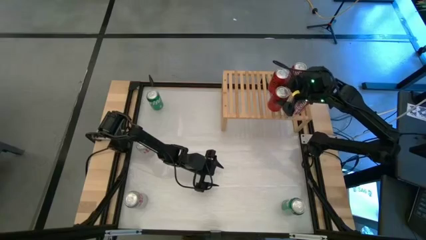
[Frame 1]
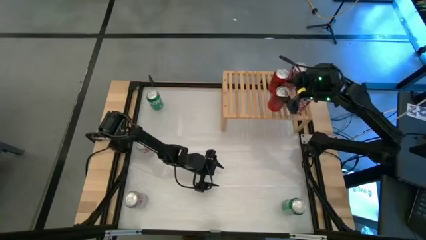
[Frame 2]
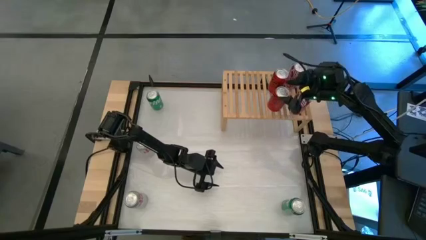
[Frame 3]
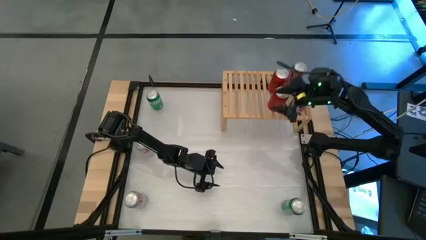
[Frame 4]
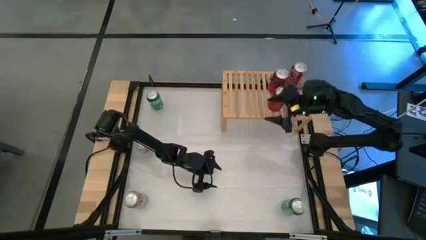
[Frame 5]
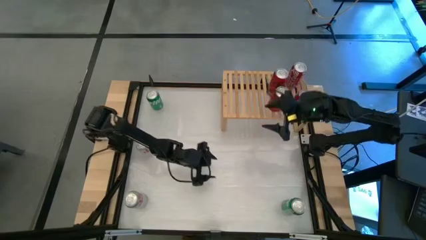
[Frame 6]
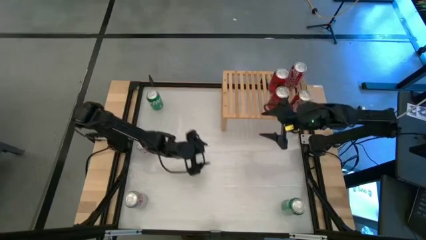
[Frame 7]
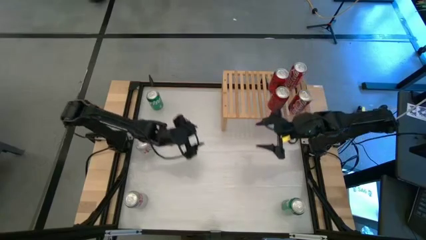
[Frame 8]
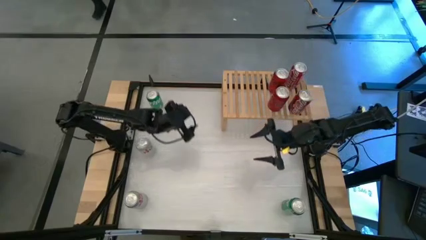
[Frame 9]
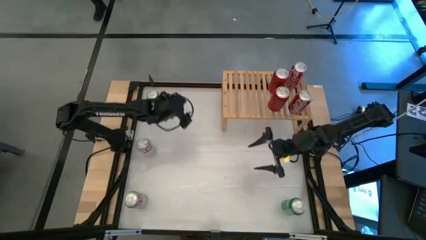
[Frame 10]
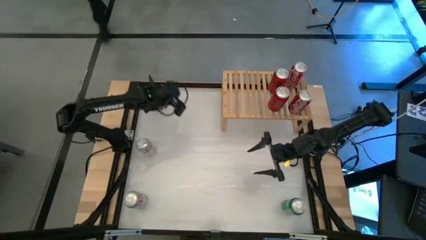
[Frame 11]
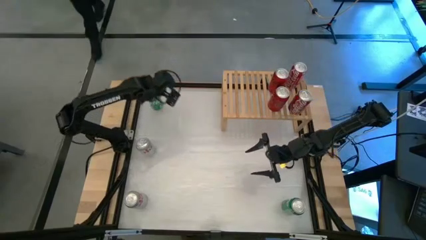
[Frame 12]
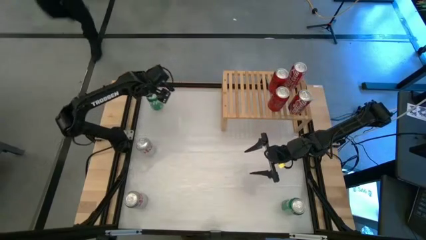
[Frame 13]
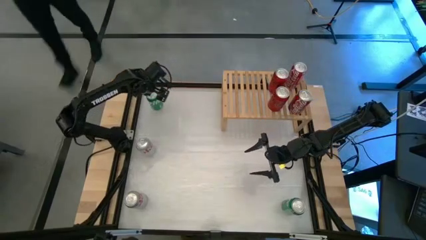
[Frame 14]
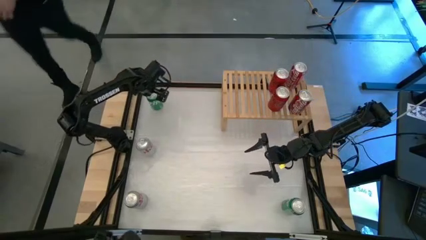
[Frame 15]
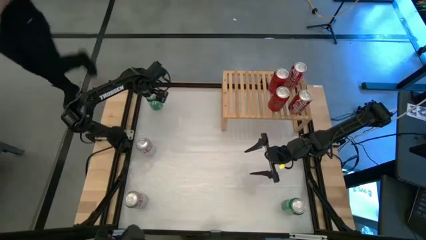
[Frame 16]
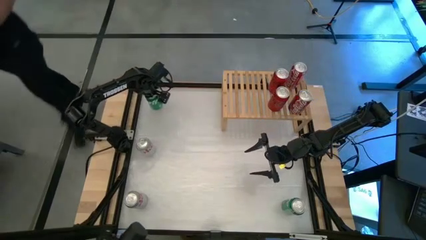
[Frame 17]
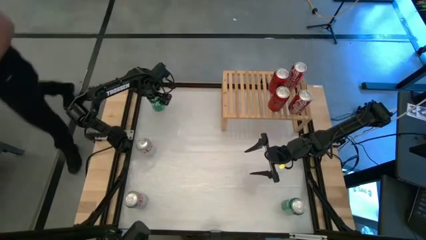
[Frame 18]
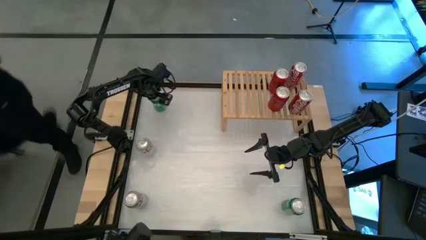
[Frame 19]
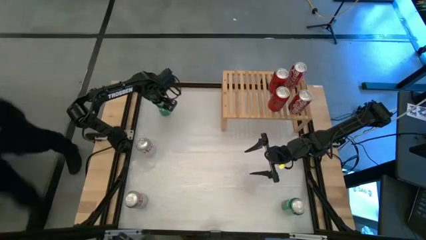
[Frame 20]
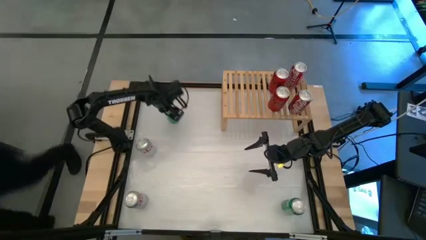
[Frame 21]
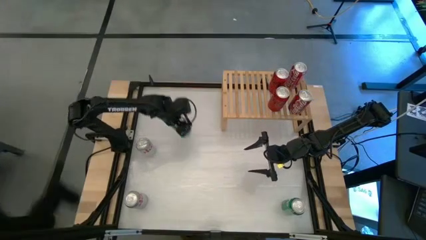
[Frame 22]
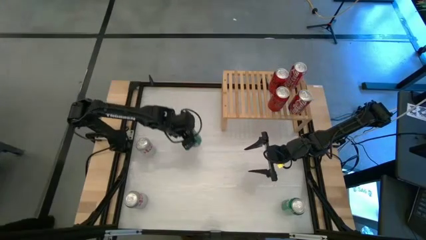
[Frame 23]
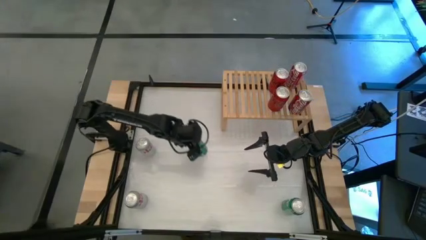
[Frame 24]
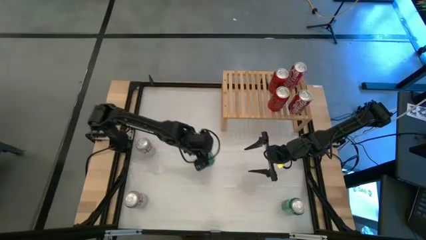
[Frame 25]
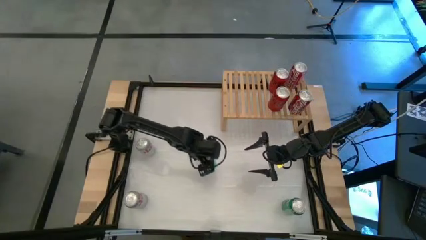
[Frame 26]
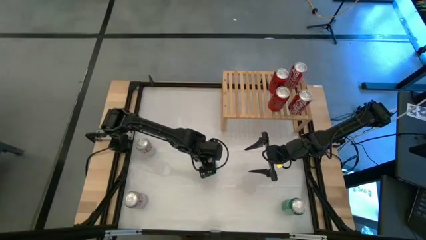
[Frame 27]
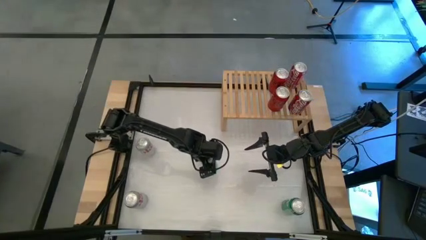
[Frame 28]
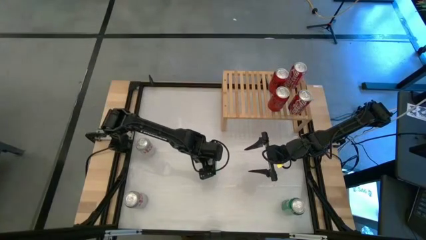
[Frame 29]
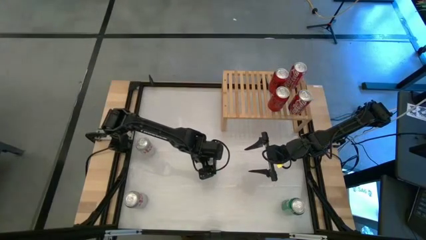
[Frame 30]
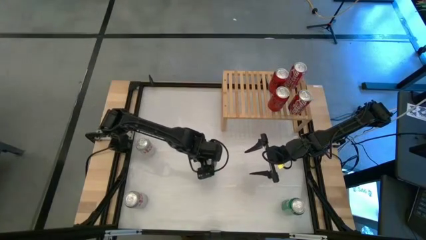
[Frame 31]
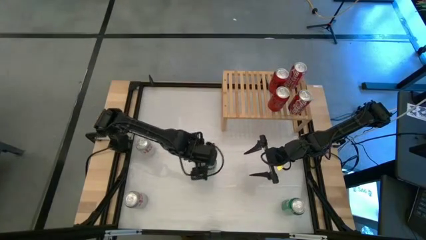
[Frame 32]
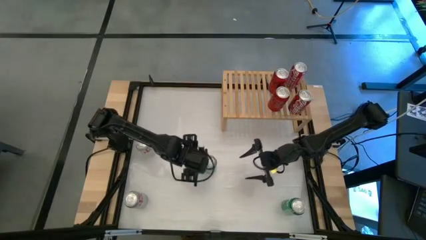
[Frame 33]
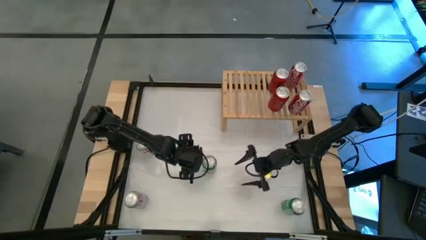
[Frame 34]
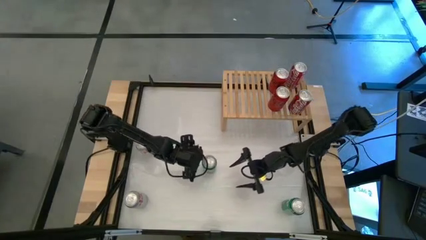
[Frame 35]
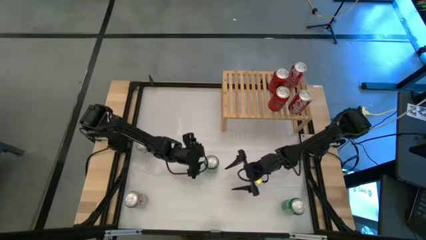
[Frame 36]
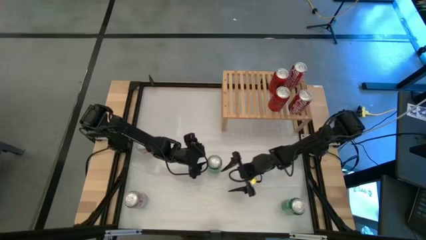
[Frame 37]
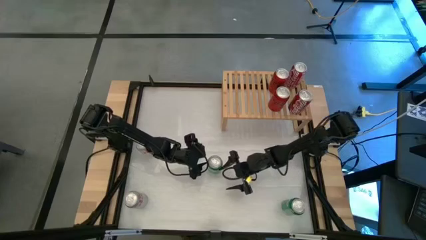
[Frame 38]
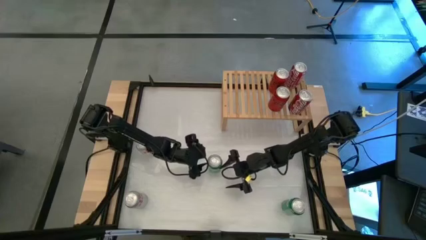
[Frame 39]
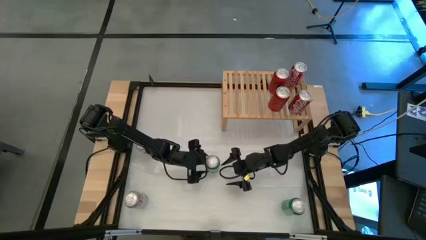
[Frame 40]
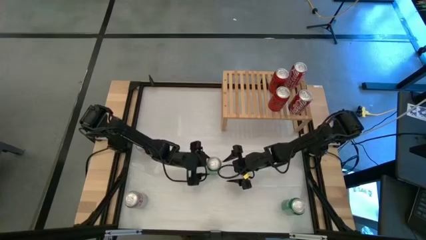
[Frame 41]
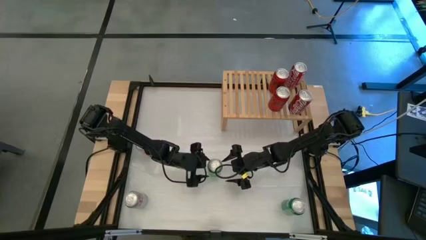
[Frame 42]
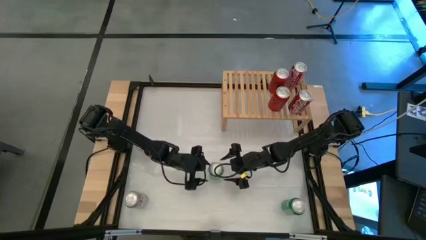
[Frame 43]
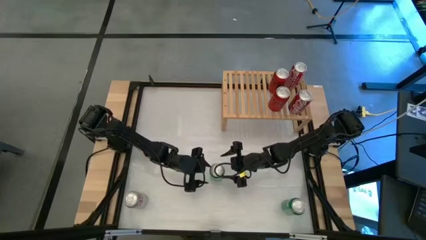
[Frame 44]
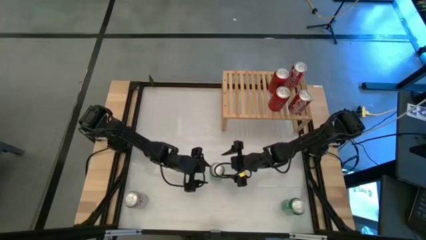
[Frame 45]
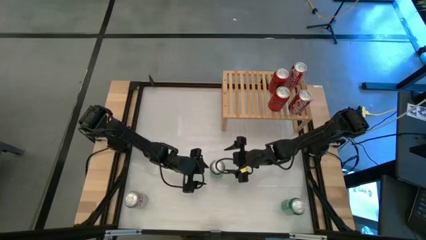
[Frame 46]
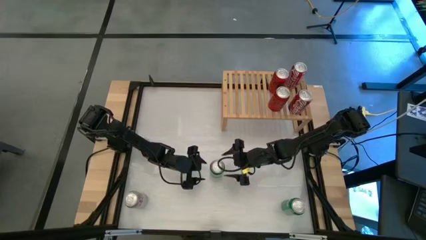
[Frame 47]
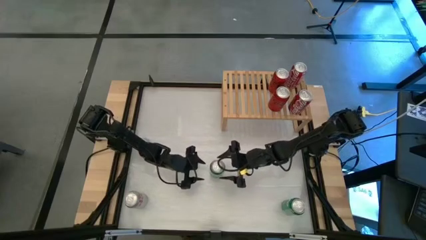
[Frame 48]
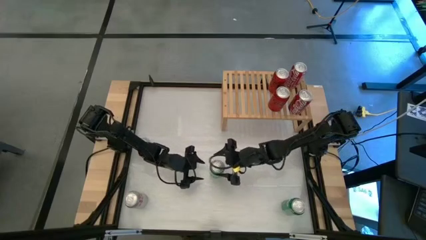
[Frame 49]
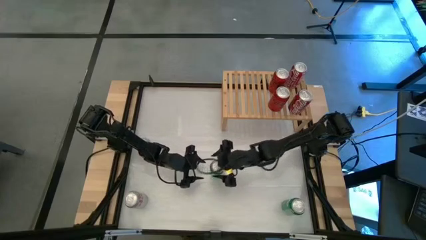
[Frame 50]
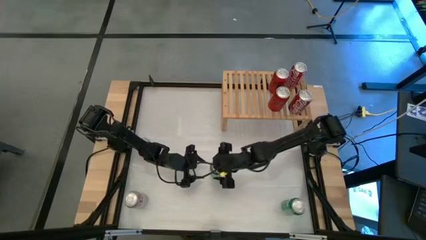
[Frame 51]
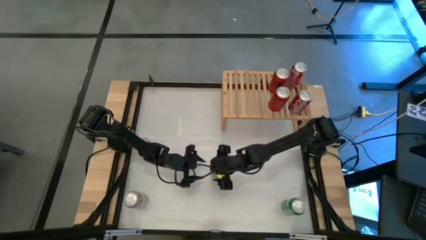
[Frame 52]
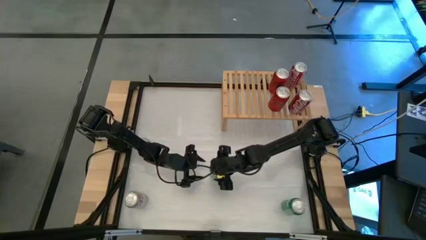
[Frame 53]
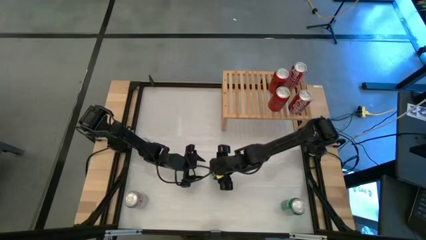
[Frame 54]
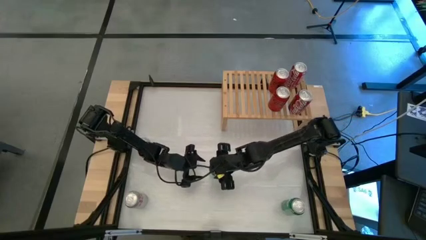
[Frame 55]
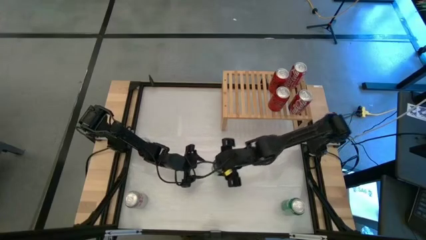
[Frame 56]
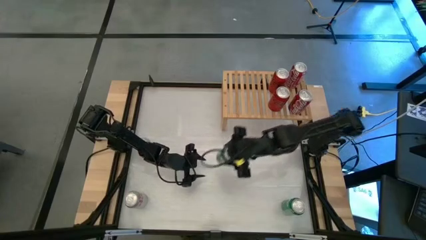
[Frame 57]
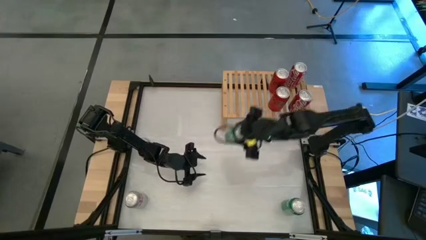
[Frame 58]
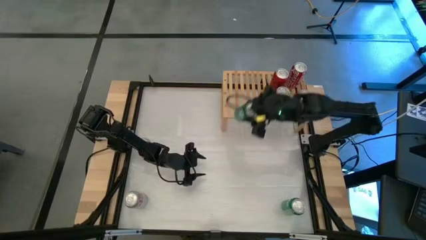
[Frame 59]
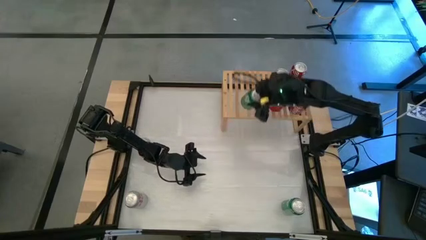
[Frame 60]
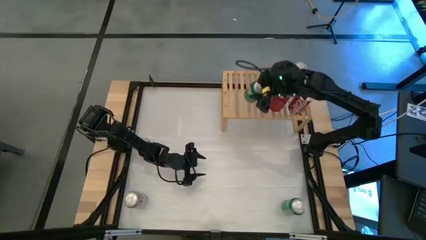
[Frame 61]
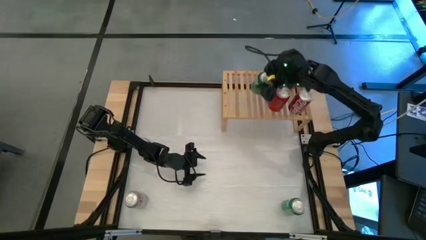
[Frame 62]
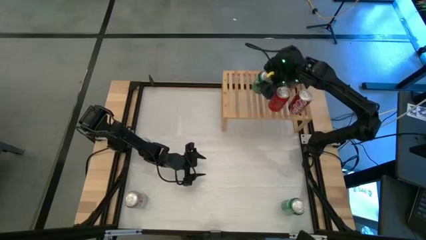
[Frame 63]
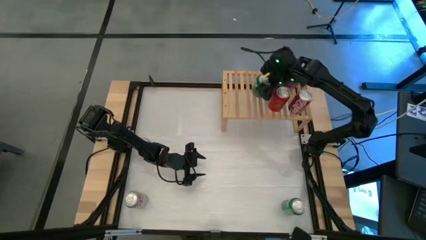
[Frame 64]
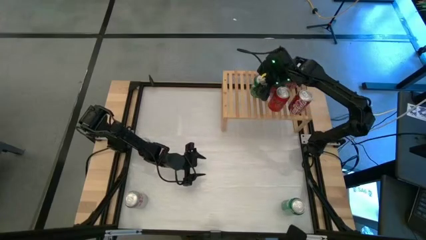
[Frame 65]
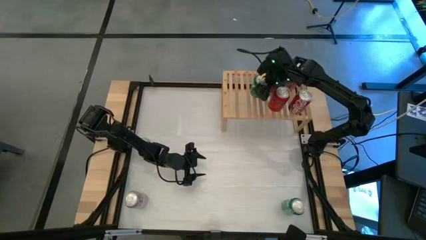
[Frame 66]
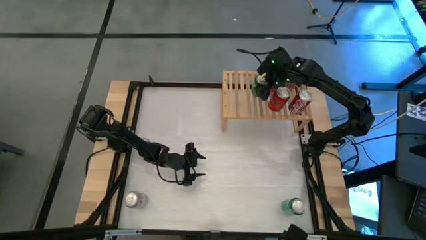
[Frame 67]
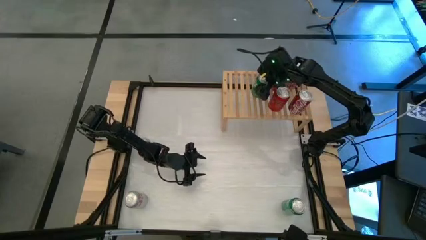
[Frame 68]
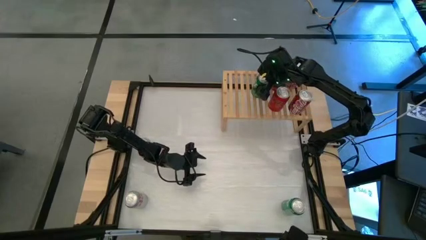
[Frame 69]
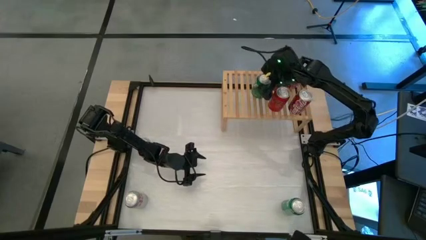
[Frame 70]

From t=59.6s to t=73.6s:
Task: Place canned beverage on shelf
Put the top green soda can on the shelf
